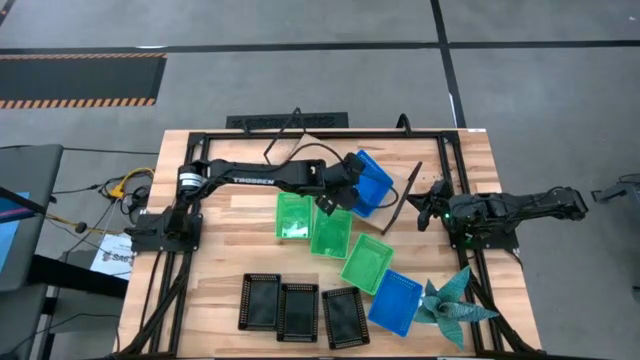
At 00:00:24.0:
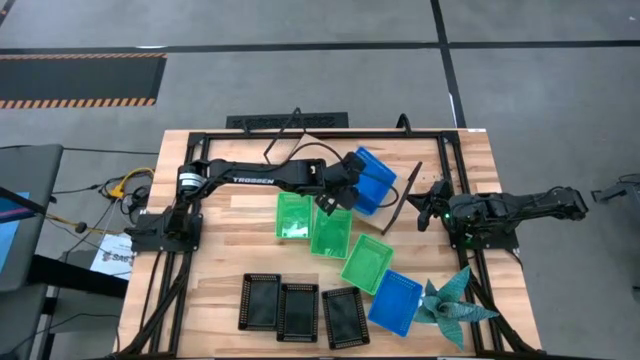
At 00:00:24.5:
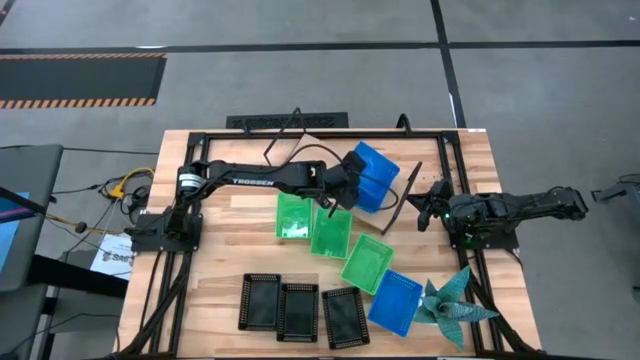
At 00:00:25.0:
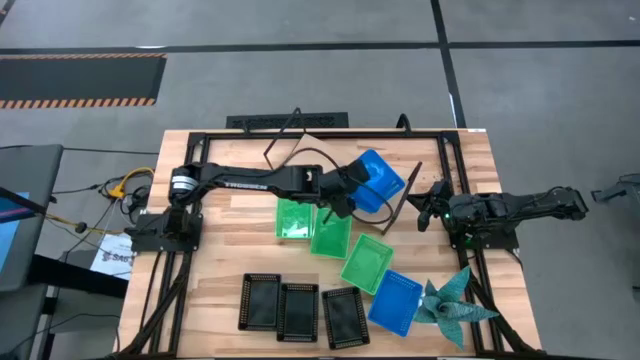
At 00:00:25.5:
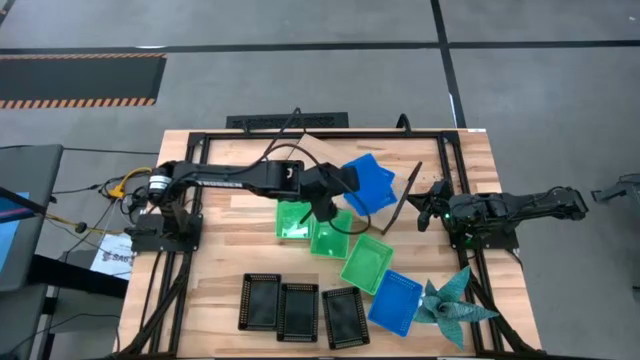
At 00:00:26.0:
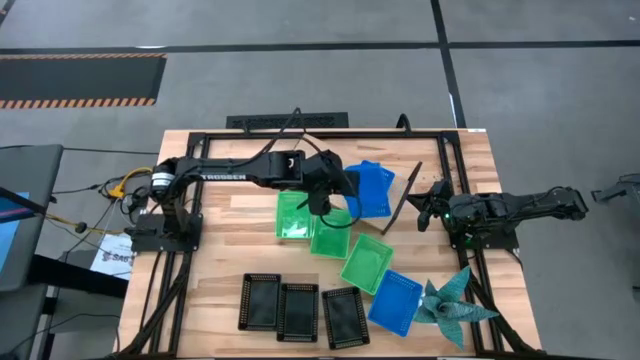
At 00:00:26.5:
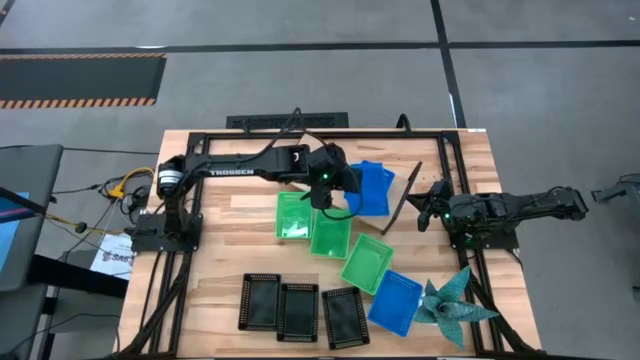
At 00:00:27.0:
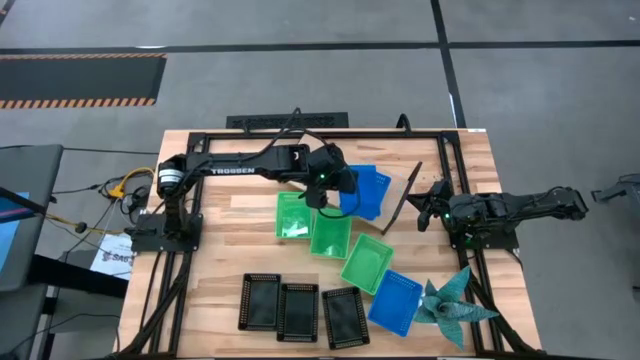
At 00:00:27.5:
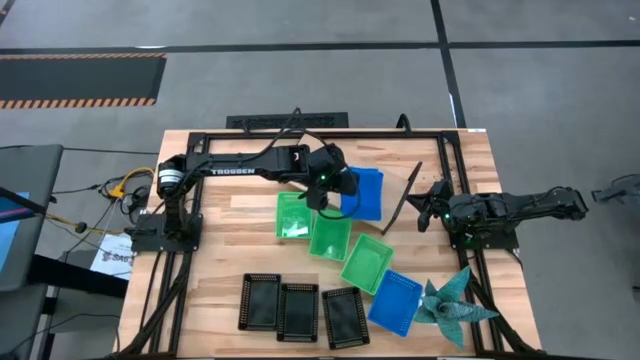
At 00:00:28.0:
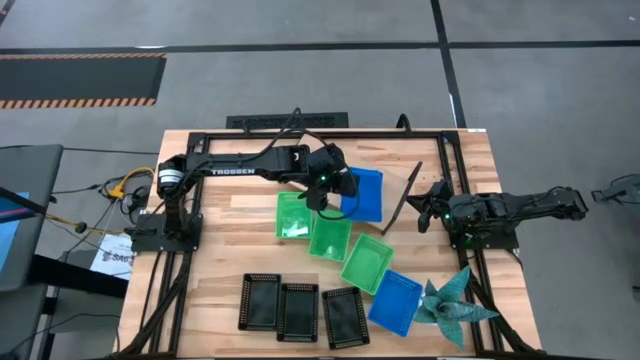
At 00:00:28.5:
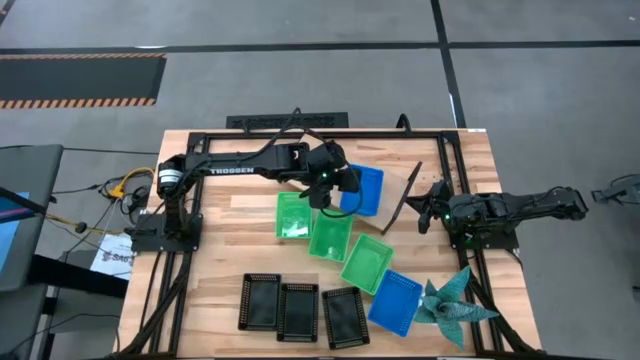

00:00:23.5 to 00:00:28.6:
Task: Stack baskets on shelf by color
Stack the left blue bin on the blue bin on the shelf

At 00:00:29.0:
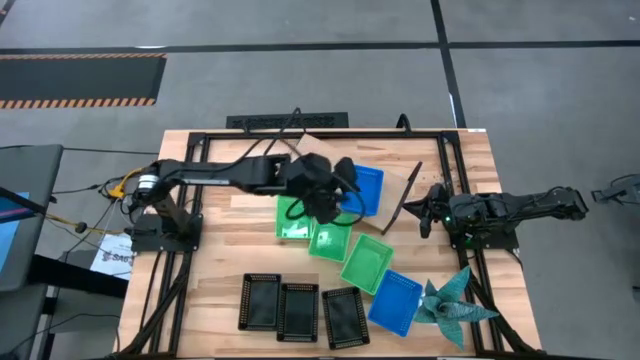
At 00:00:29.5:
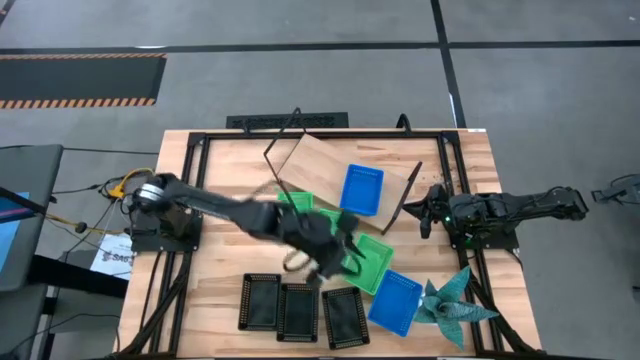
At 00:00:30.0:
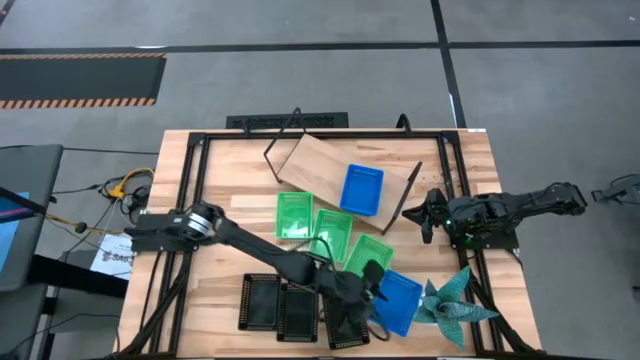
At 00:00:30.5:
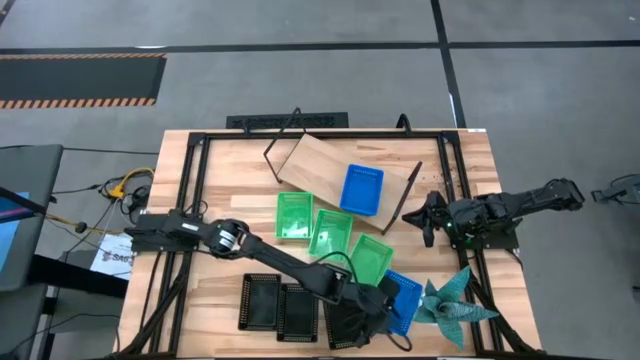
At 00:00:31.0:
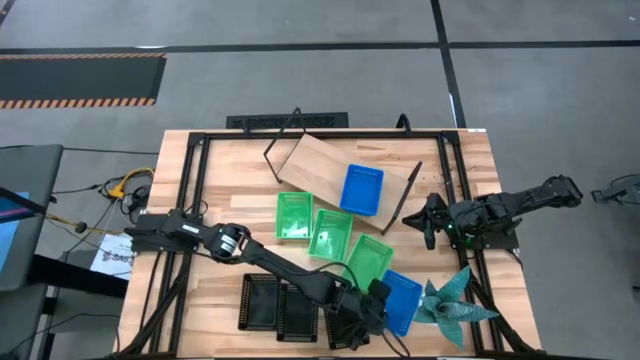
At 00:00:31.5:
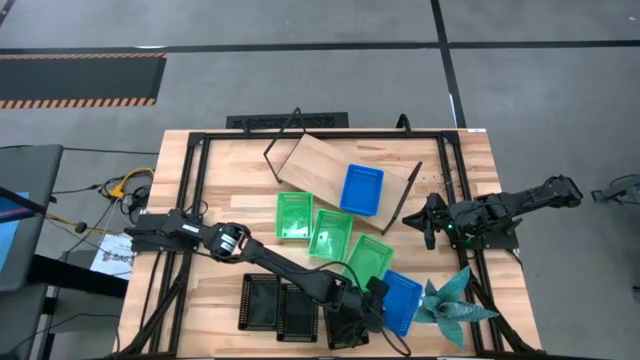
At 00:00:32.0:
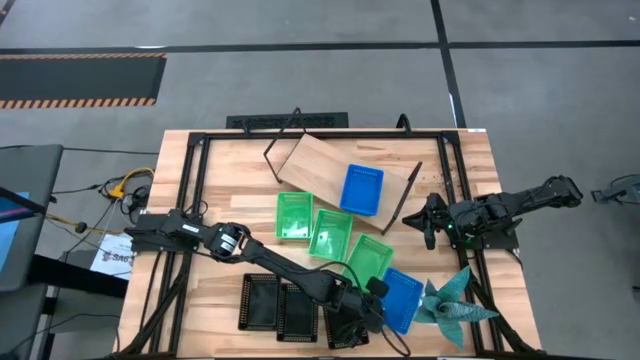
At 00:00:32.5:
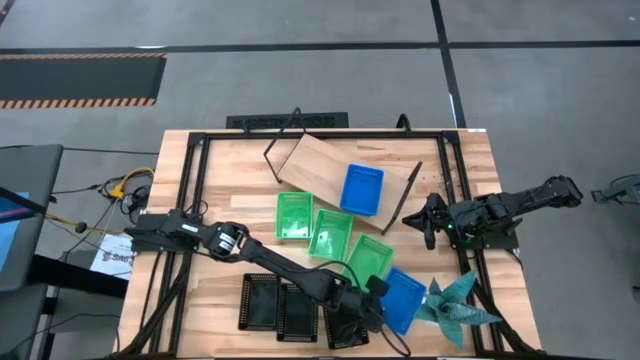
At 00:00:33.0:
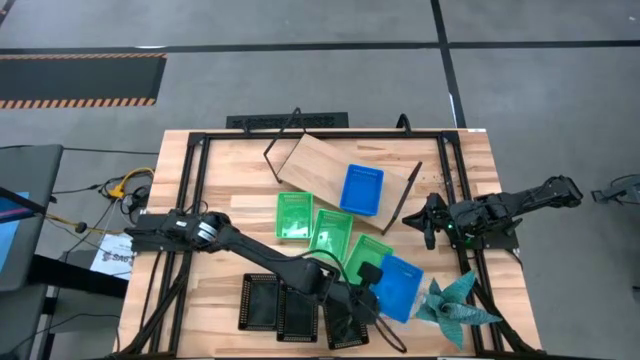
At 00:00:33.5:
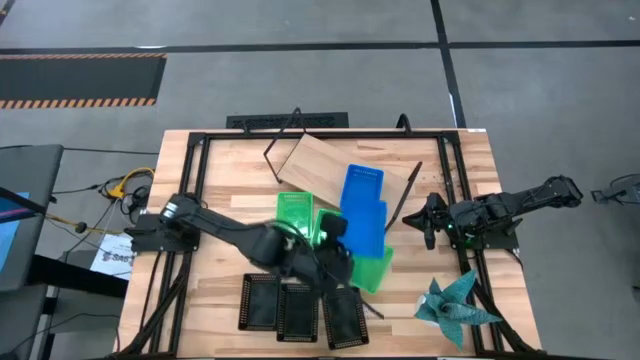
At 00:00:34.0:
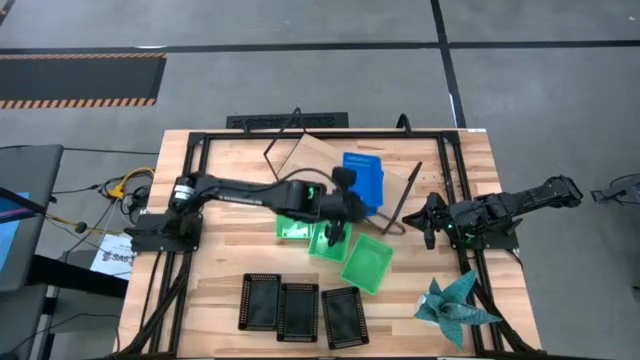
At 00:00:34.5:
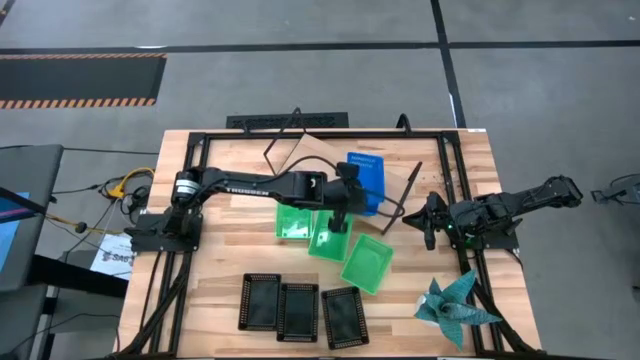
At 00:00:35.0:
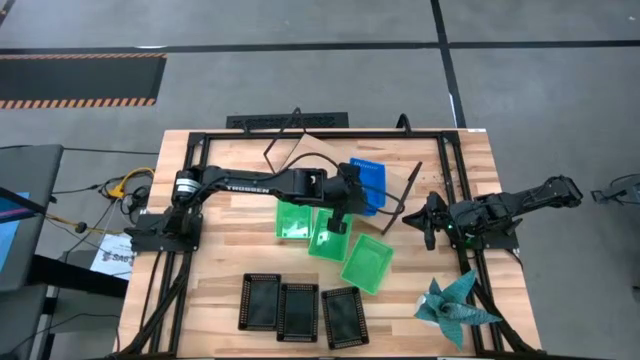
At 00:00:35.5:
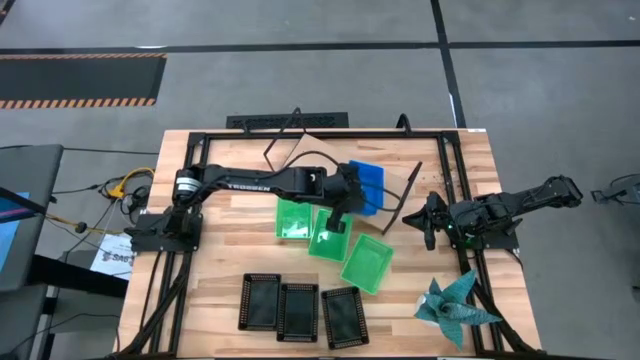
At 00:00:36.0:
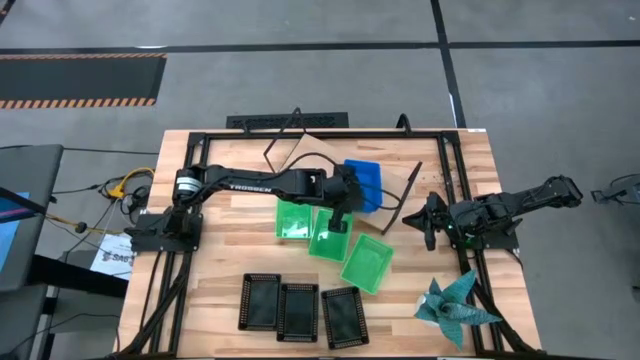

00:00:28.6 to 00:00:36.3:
Stack the blue bin on the blue bin on the shelf

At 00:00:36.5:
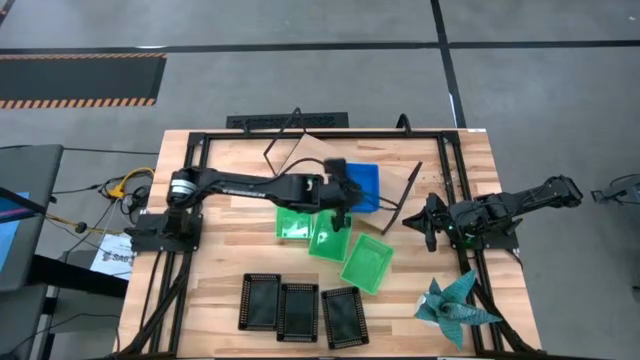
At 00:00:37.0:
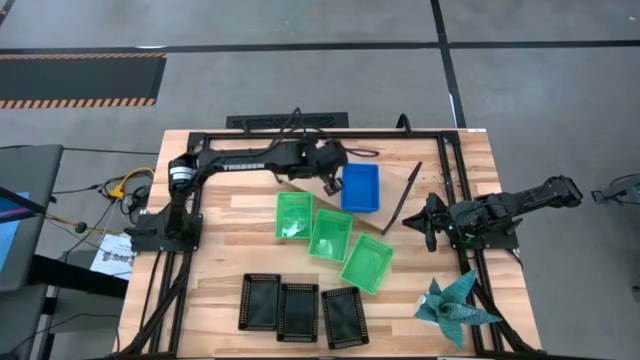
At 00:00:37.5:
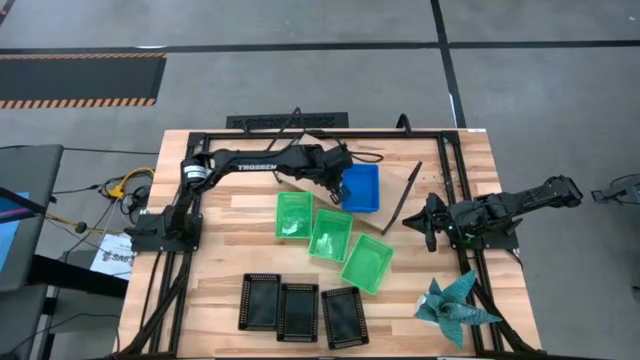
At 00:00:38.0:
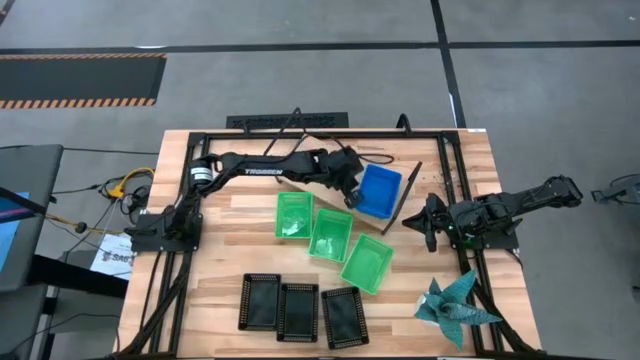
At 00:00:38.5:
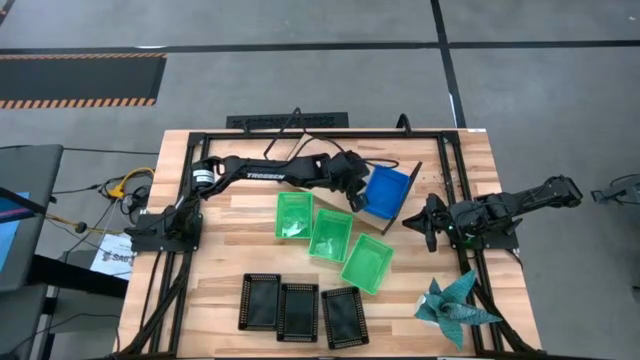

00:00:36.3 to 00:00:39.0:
Adjust the blue bins on the shelf

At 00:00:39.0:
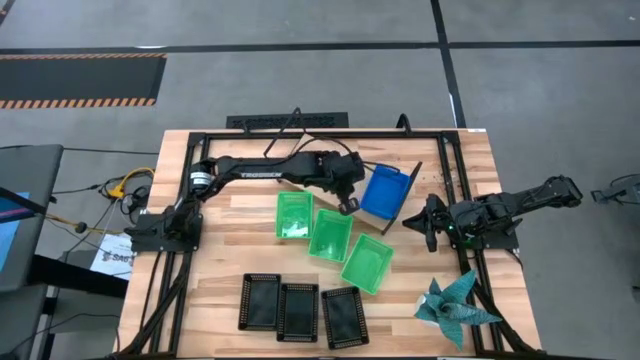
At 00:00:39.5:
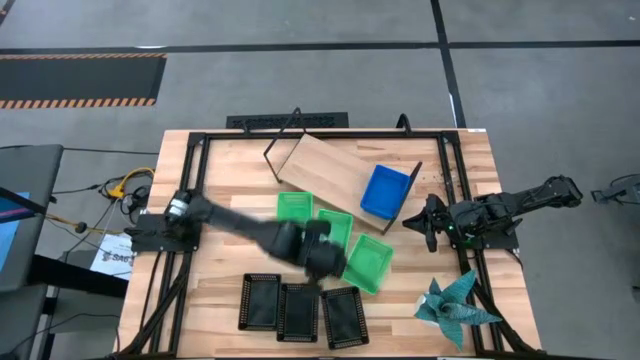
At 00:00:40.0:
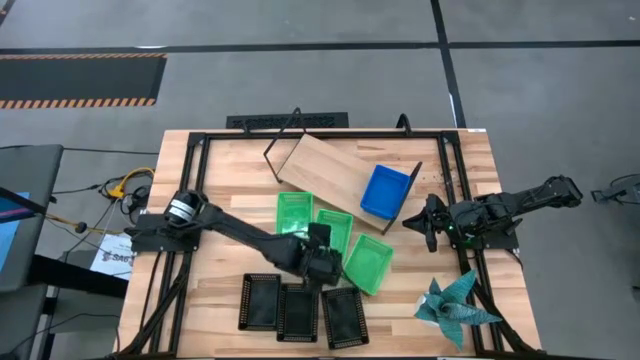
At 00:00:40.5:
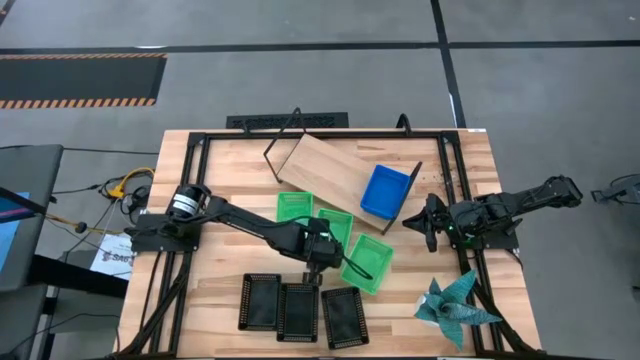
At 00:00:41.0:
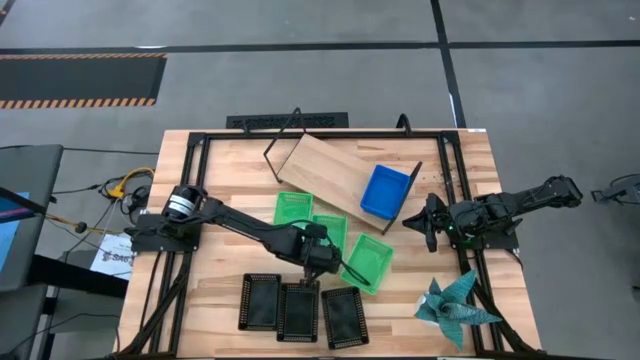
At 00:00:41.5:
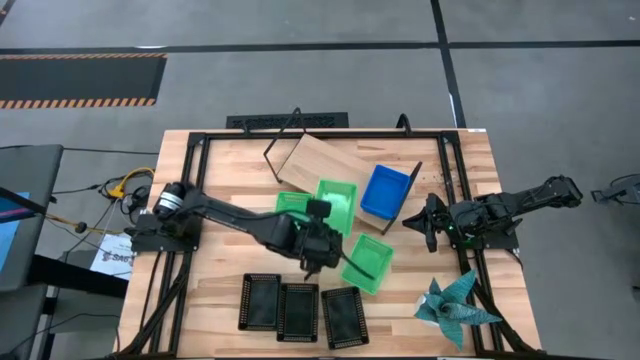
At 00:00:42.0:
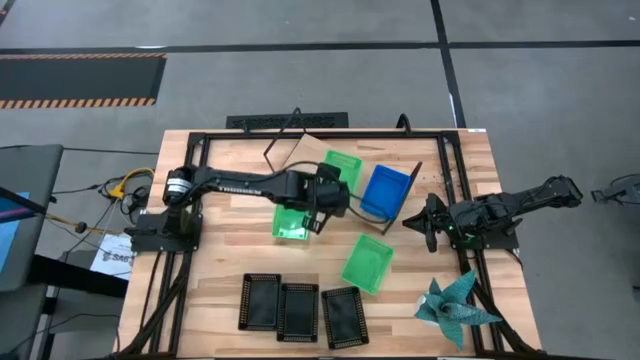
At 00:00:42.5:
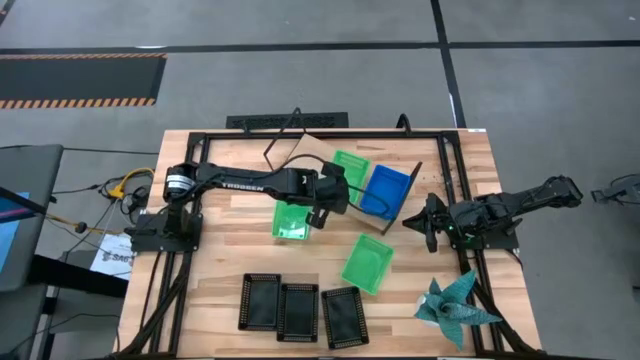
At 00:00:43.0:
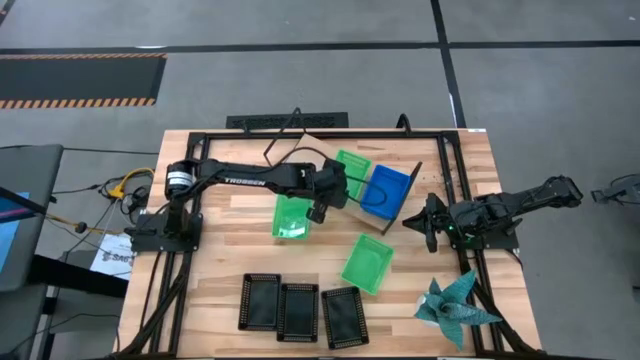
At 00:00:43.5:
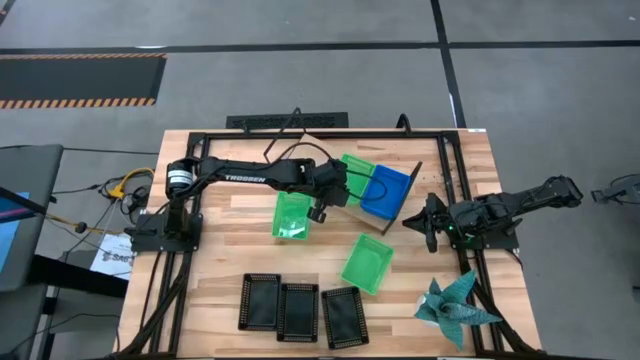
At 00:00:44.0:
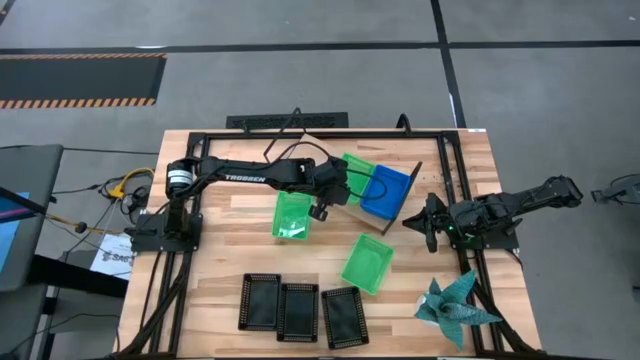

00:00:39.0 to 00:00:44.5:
Put the middle green bin on the shelf
